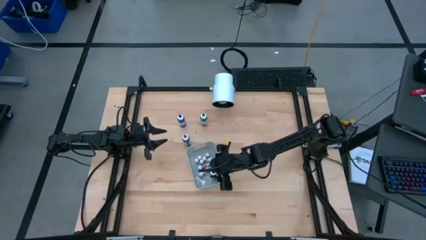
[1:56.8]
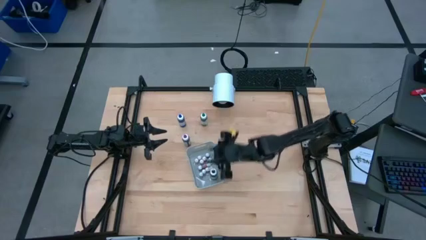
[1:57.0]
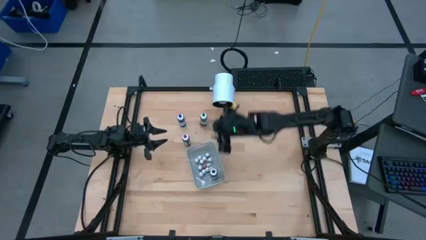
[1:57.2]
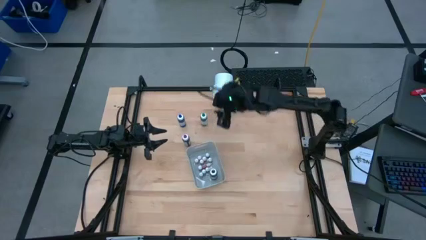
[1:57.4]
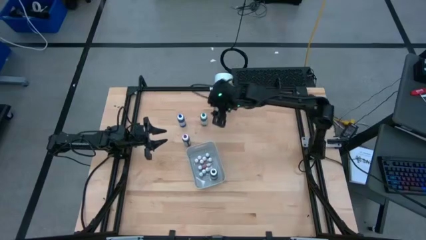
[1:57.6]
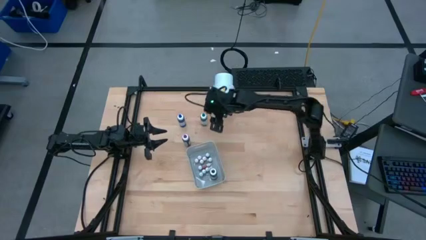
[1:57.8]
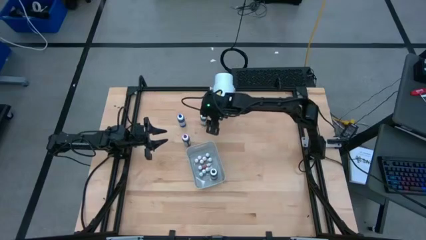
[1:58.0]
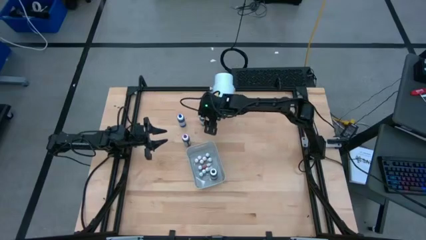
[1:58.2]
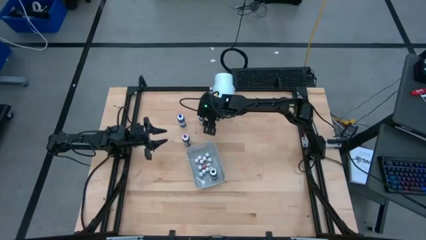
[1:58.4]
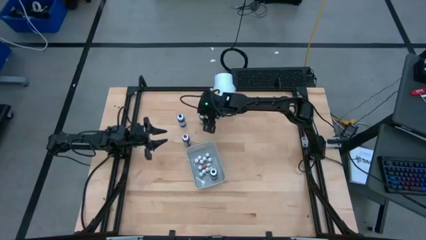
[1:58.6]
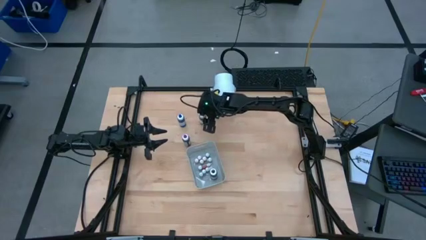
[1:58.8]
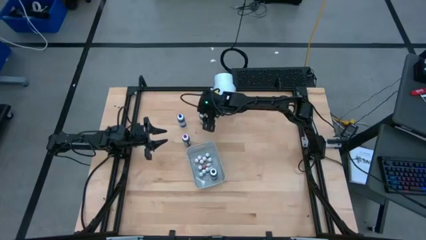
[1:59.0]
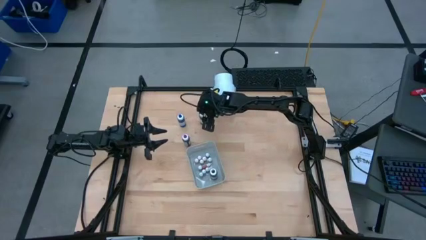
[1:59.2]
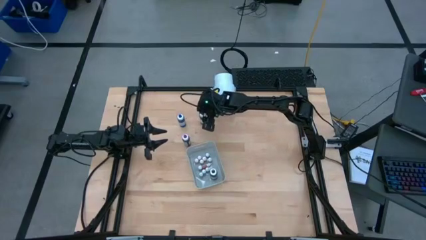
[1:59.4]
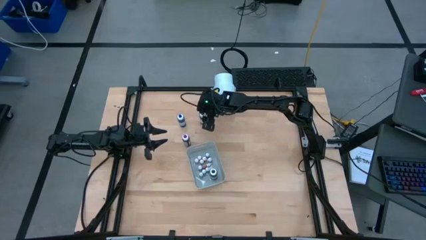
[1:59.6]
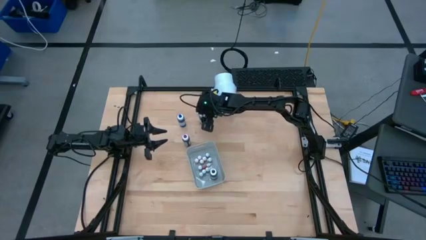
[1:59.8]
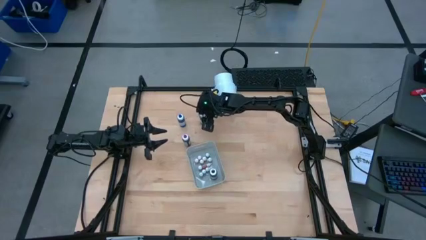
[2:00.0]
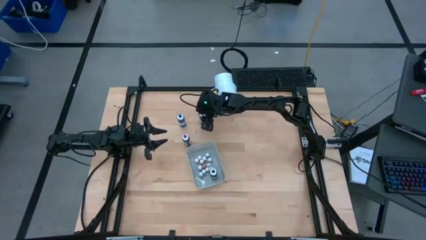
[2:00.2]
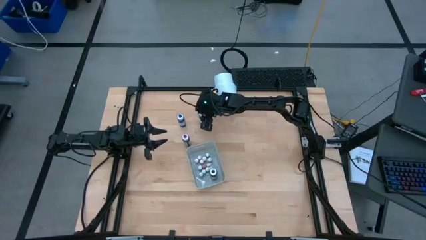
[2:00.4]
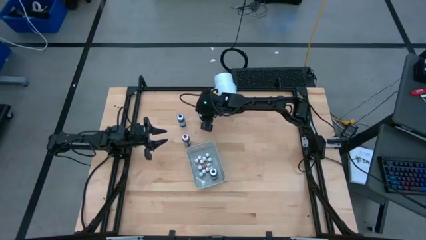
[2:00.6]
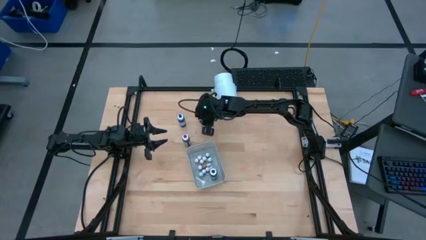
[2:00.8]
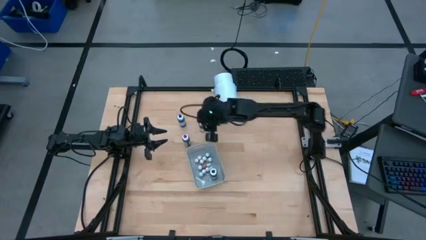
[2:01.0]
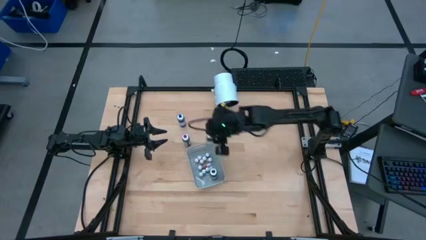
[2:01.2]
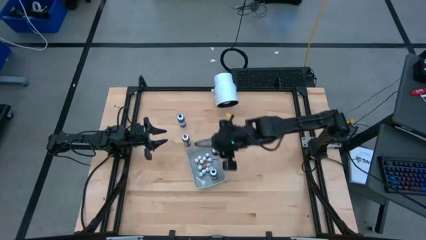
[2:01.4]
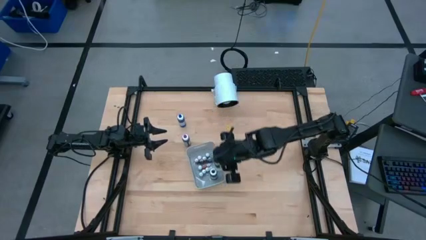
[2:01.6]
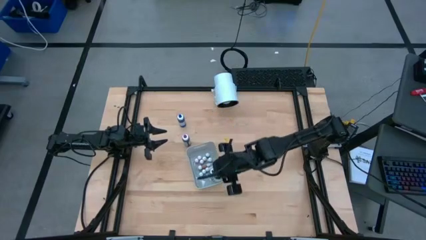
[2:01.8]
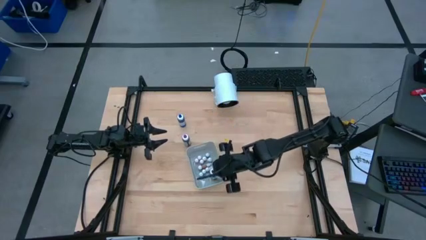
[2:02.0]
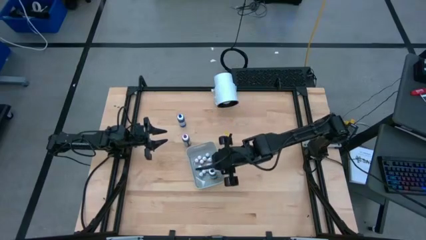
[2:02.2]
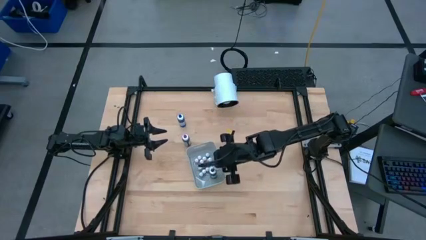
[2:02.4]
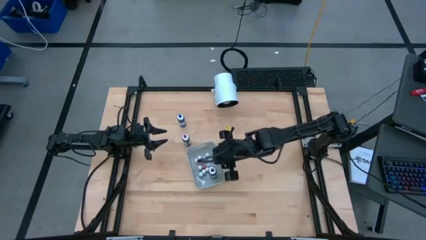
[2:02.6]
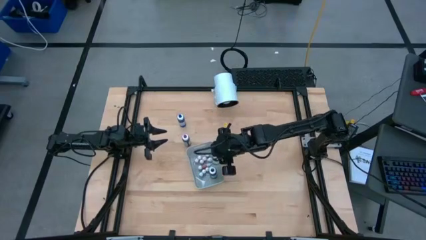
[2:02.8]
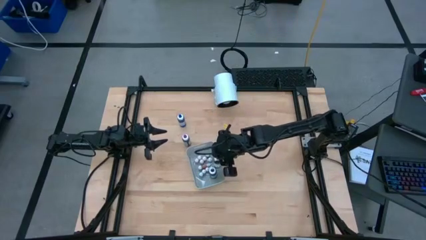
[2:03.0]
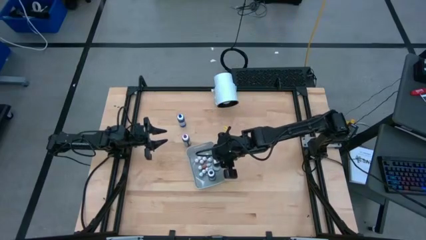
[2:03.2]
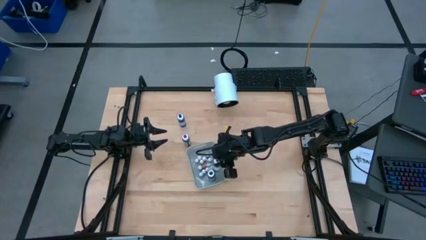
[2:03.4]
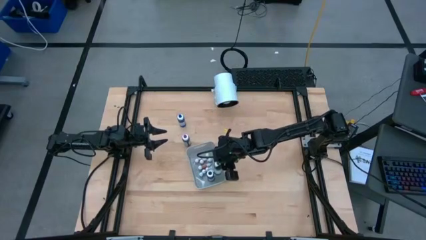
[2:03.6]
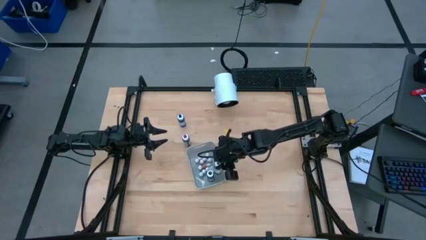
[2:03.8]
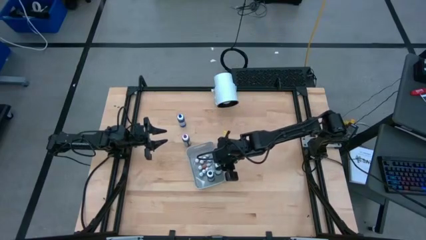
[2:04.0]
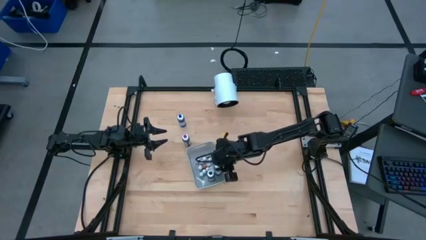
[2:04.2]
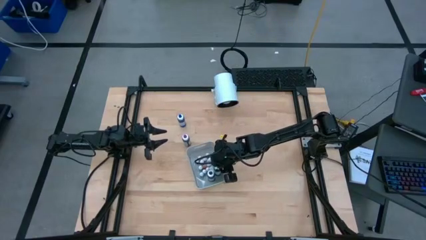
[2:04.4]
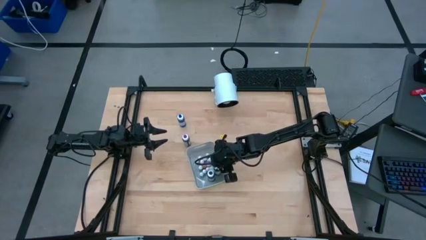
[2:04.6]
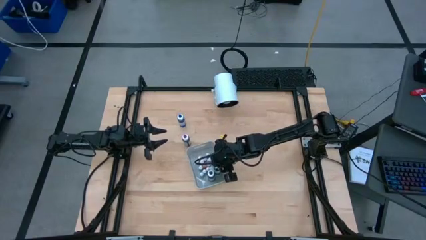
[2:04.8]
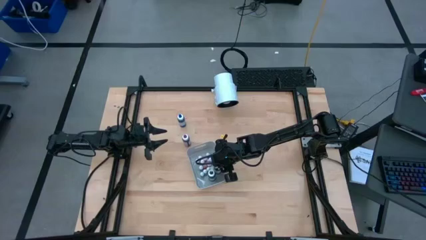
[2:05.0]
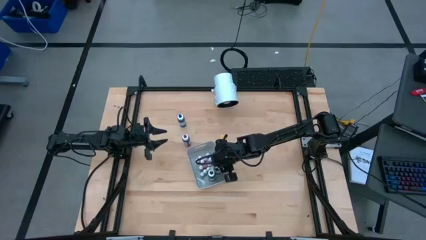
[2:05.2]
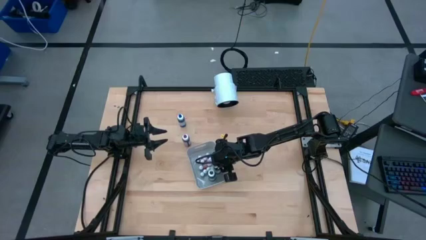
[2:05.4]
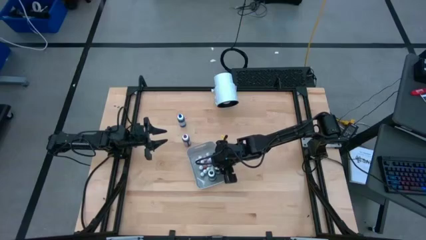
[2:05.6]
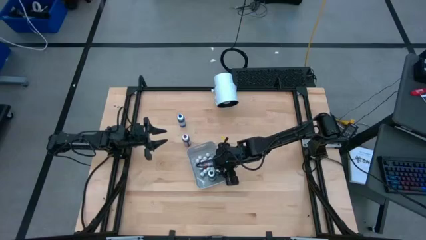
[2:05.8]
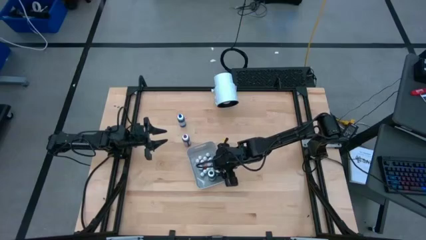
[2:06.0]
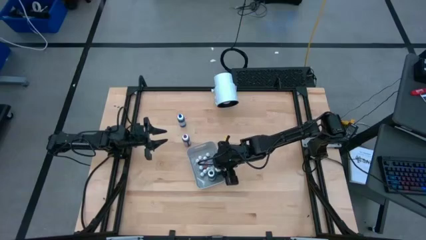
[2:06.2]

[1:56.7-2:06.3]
Task: Pick & Place food coloring
Put the large green food coloring bottle into the gray bin

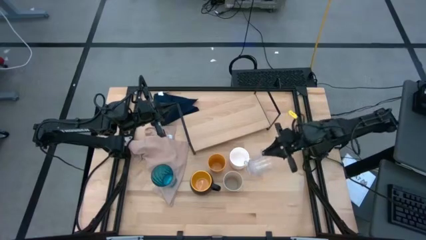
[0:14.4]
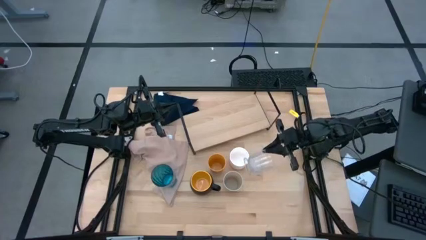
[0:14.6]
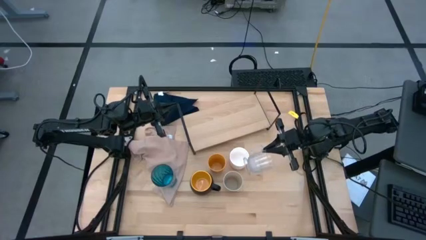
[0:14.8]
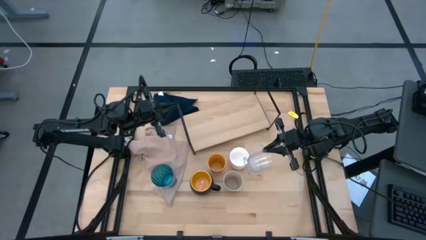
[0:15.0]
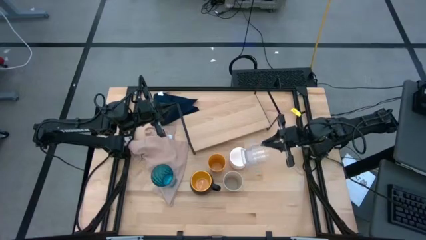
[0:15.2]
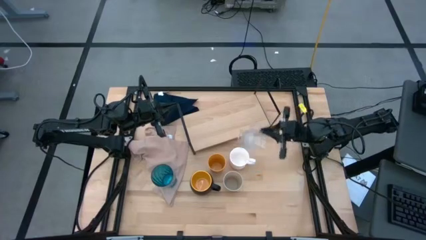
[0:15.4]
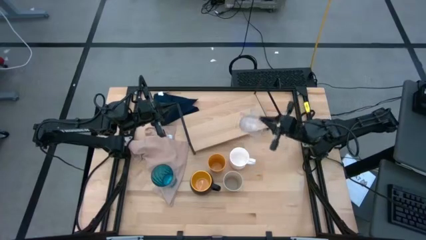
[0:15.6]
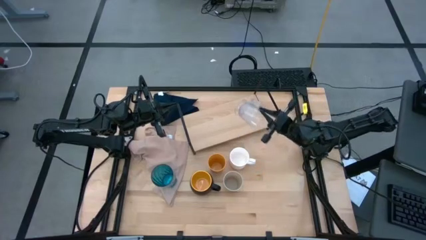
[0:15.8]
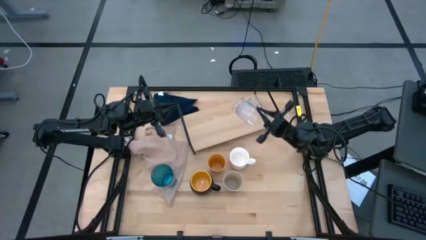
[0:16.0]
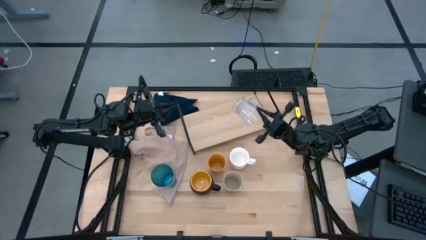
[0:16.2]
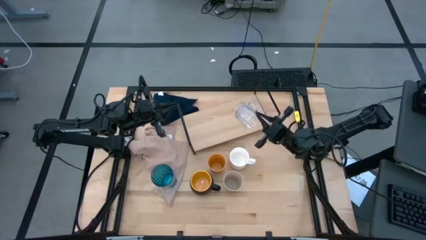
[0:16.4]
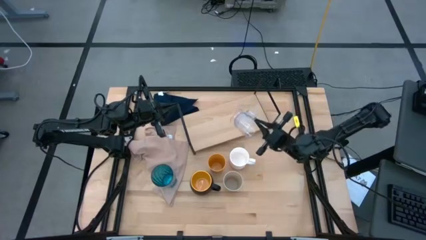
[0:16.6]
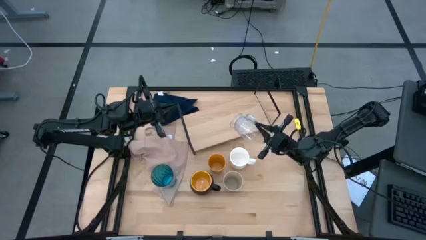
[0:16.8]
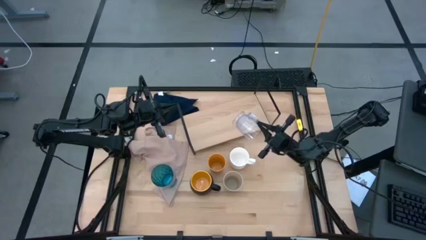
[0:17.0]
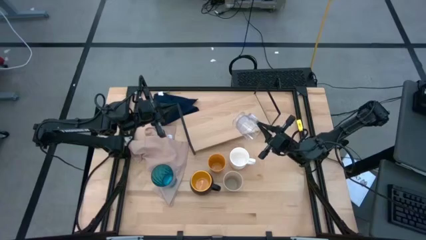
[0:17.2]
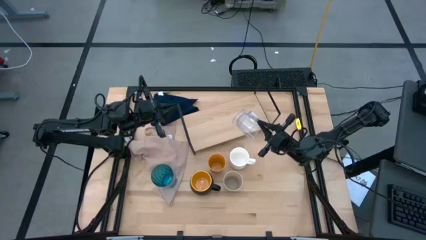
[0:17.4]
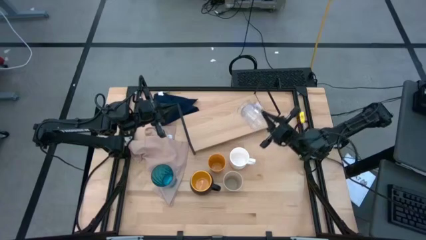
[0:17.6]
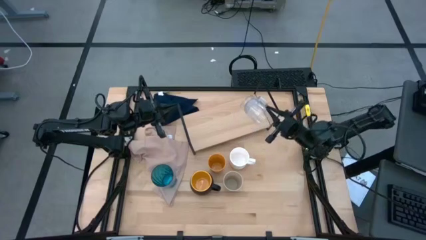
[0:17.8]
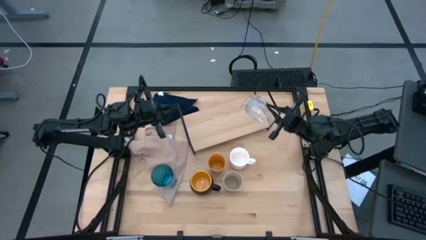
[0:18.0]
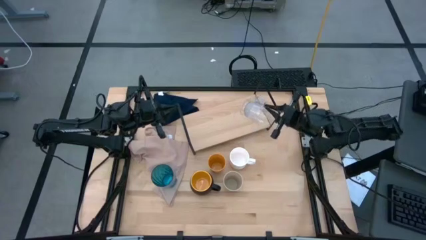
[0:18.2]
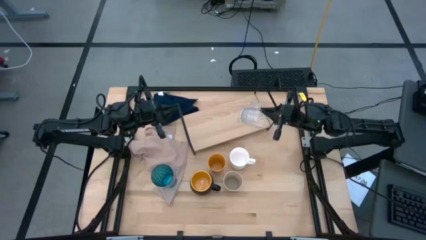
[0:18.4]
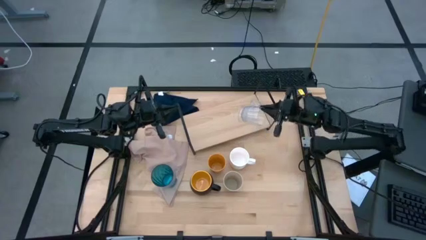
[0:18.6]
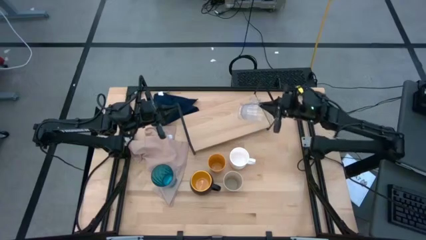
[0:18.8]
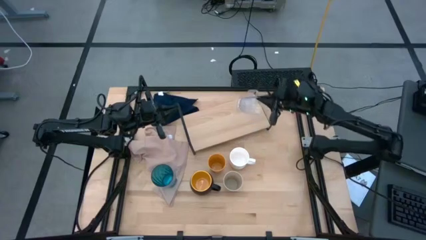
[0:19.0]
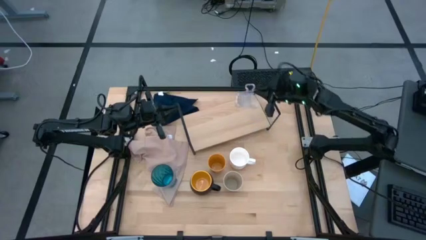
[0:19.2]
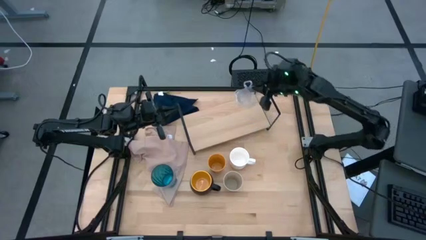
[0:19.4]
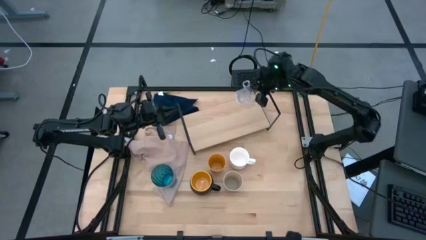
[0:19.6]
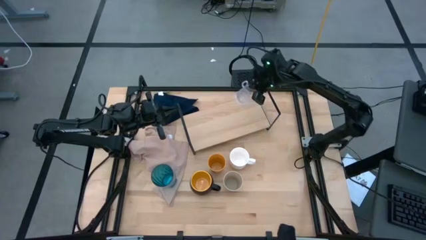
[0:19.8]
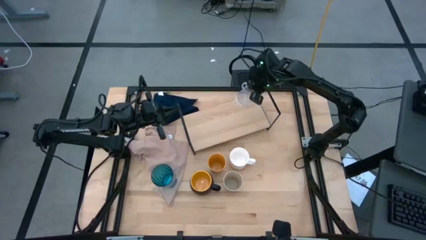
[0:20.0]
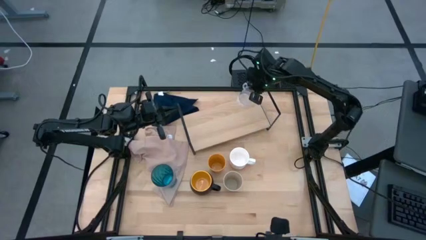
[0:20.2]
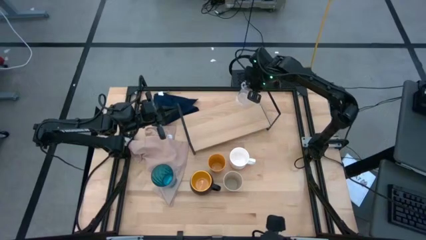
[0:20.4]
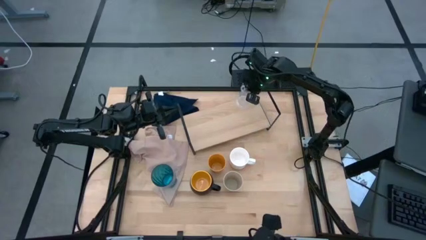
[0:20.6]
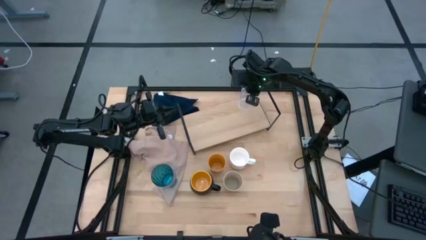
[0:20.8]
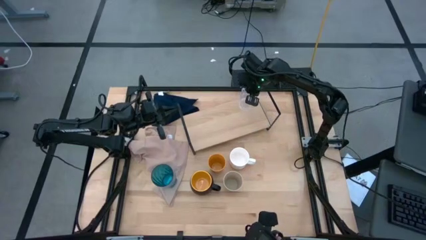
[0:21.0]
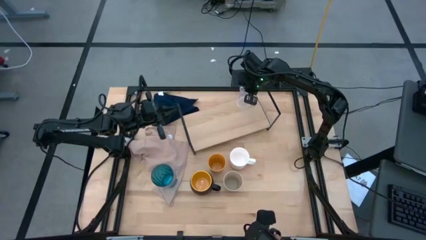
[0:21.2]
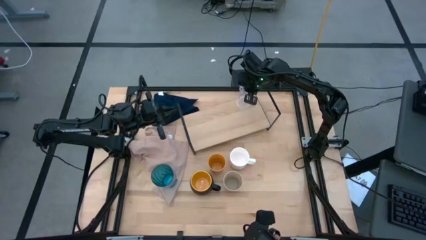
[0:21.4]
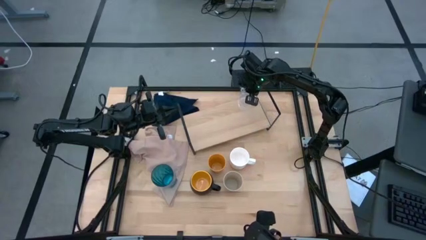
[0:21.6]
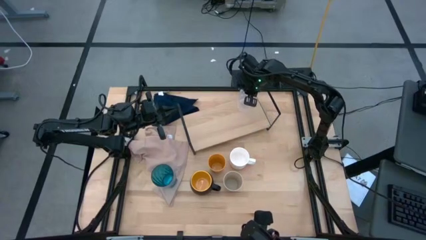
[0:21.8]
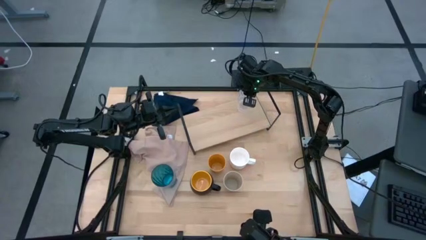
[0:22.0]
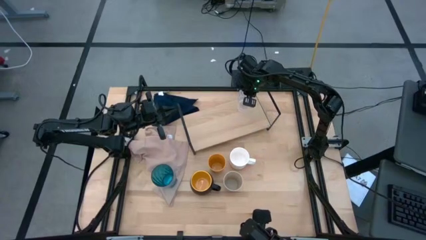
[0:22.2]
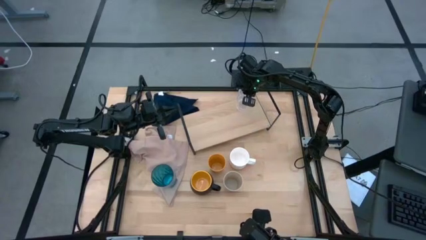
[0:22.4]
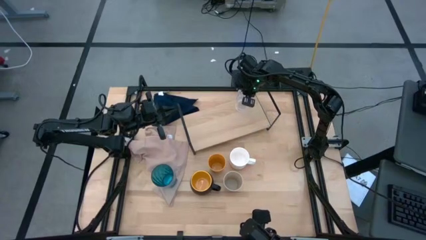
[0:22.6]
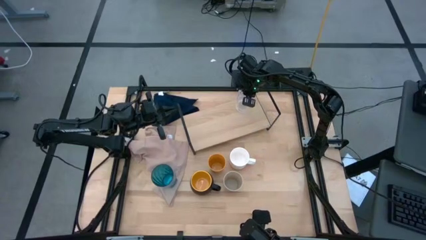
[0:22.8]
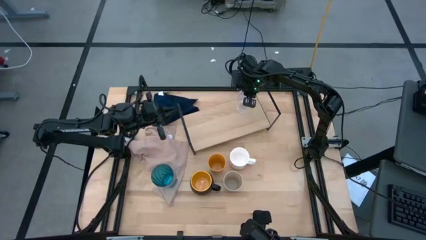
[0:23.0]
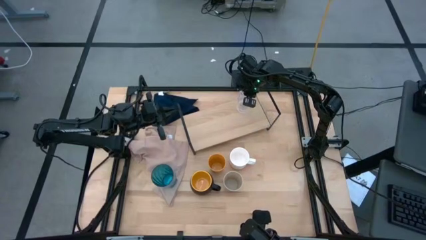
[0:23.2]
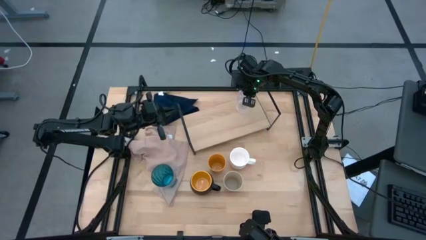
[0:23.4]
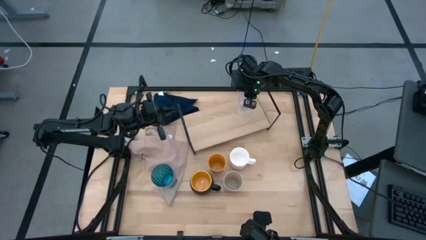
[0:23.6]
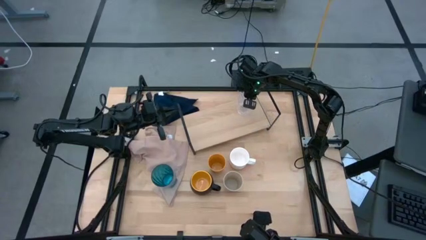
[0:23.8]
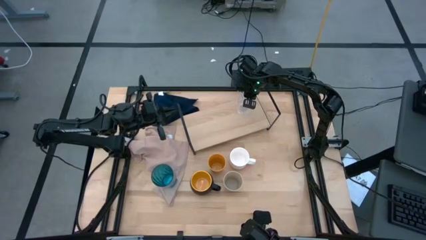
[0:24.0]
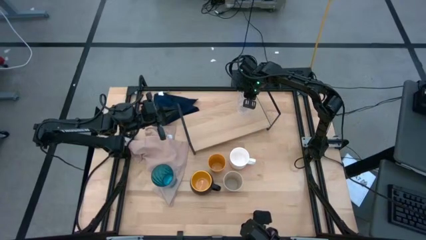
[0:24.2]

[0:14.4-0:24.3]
Task: Stack small to large cups/mugs on shelf
Put the transparent cup on the shelf
